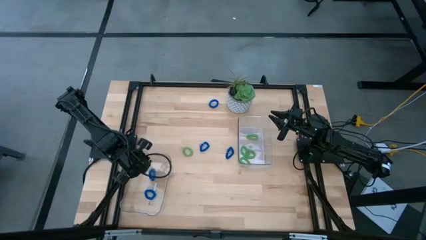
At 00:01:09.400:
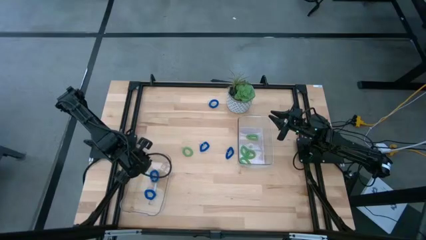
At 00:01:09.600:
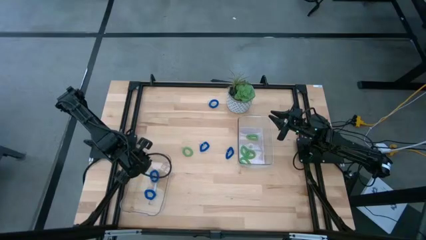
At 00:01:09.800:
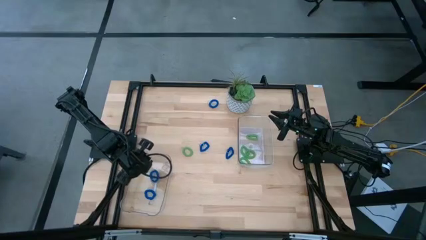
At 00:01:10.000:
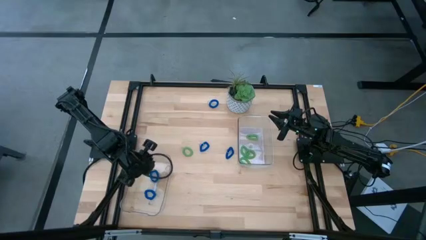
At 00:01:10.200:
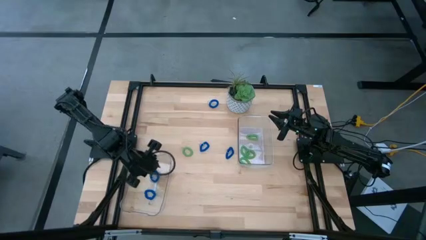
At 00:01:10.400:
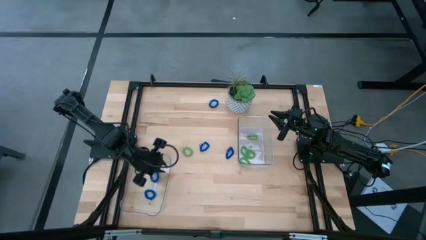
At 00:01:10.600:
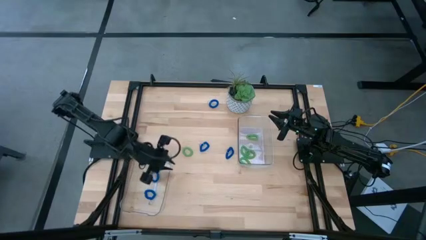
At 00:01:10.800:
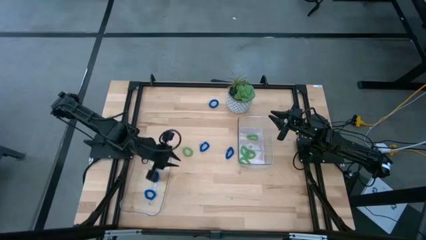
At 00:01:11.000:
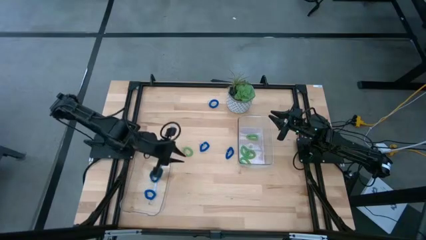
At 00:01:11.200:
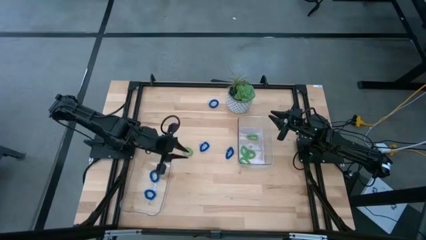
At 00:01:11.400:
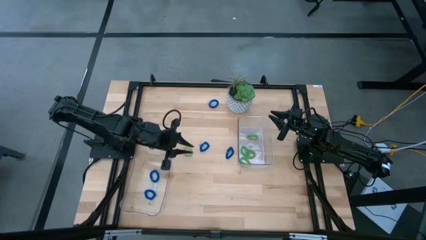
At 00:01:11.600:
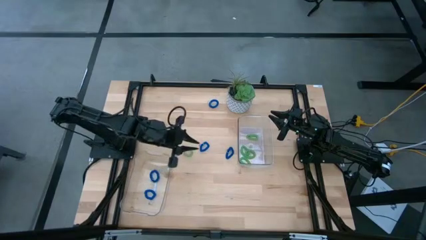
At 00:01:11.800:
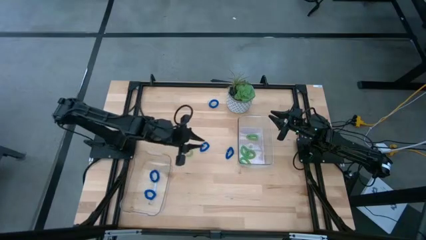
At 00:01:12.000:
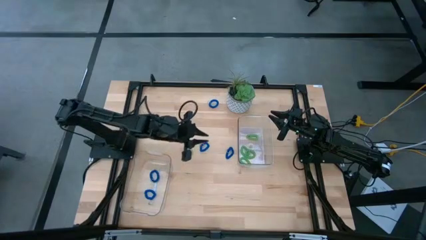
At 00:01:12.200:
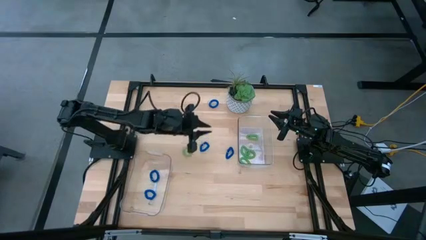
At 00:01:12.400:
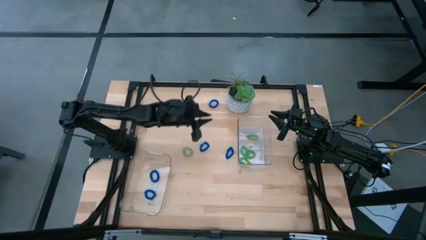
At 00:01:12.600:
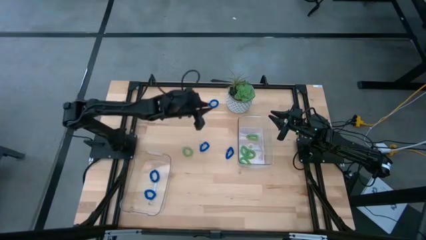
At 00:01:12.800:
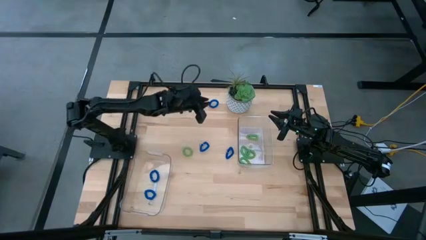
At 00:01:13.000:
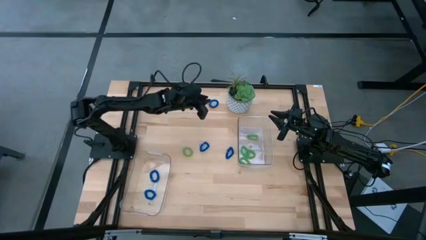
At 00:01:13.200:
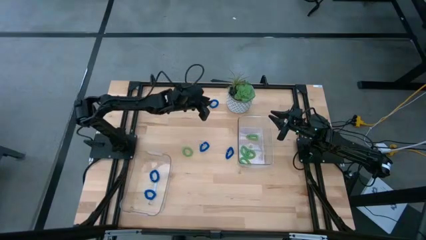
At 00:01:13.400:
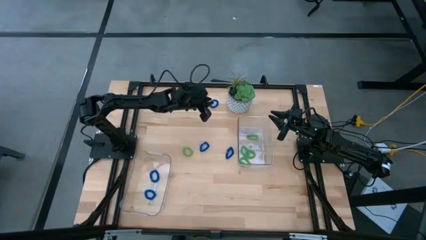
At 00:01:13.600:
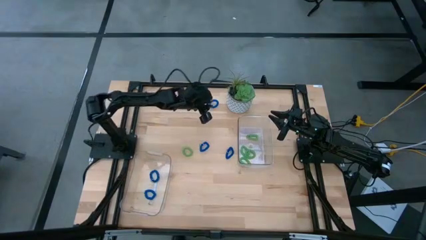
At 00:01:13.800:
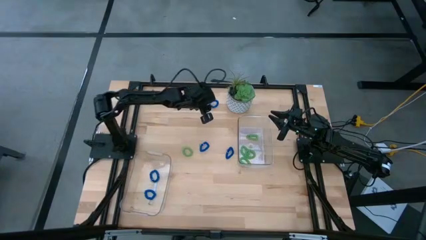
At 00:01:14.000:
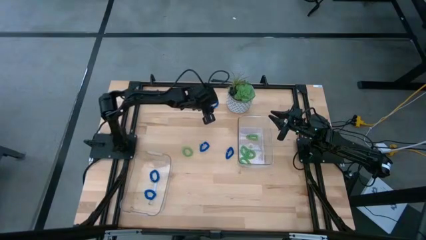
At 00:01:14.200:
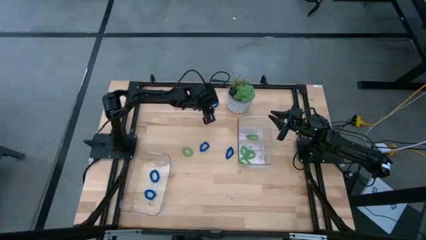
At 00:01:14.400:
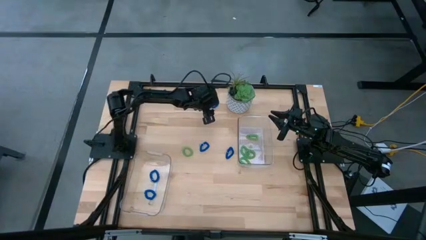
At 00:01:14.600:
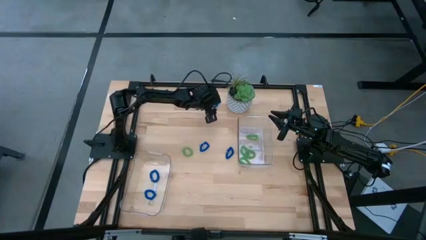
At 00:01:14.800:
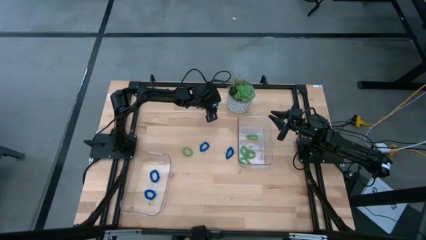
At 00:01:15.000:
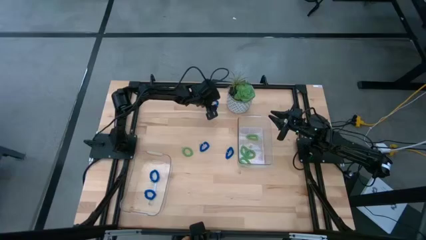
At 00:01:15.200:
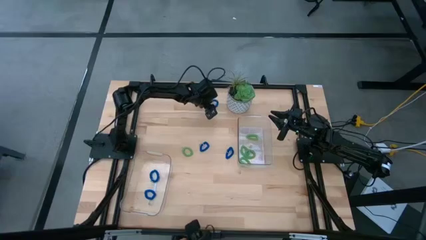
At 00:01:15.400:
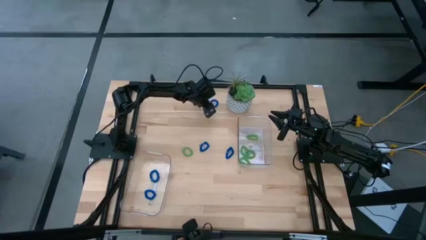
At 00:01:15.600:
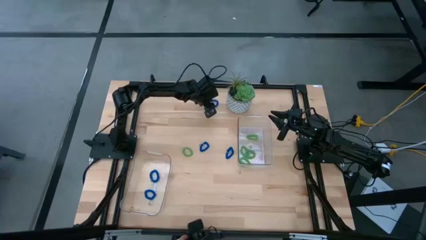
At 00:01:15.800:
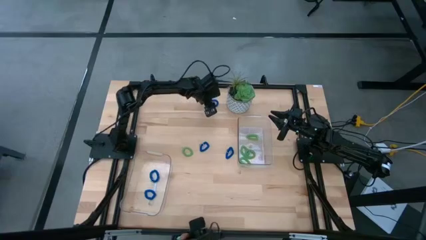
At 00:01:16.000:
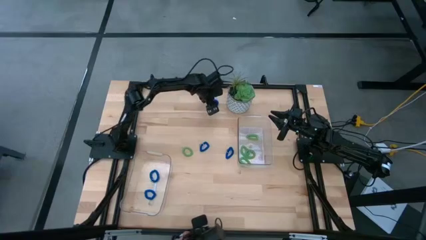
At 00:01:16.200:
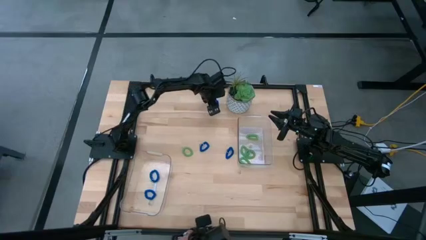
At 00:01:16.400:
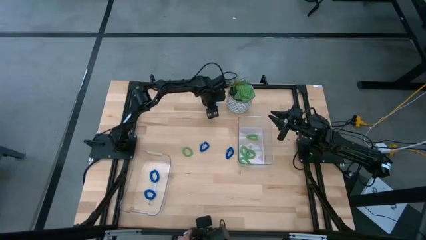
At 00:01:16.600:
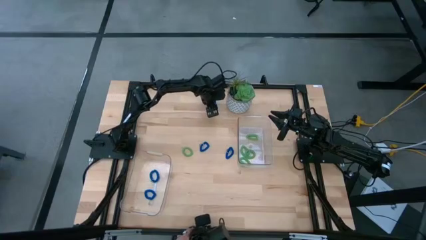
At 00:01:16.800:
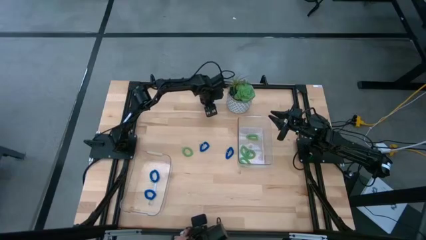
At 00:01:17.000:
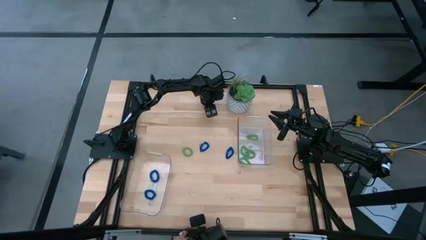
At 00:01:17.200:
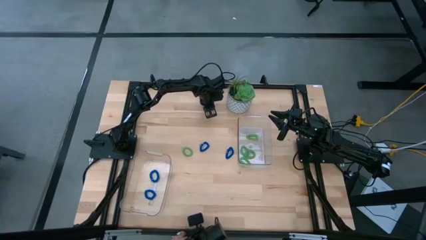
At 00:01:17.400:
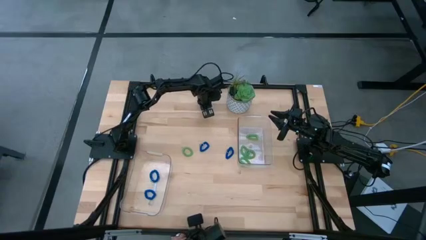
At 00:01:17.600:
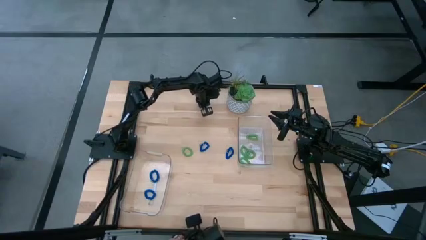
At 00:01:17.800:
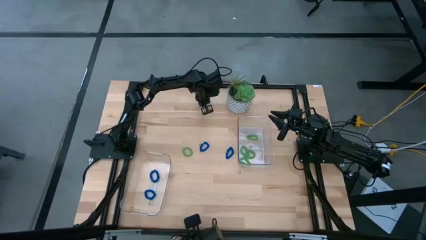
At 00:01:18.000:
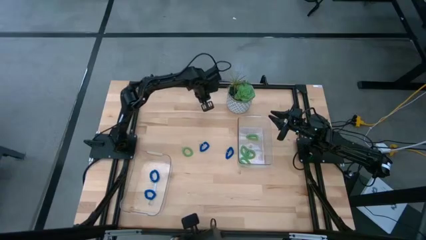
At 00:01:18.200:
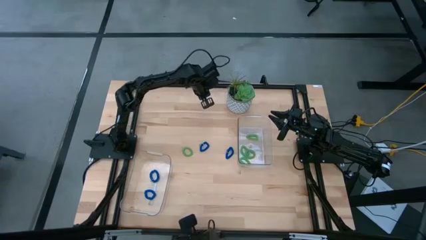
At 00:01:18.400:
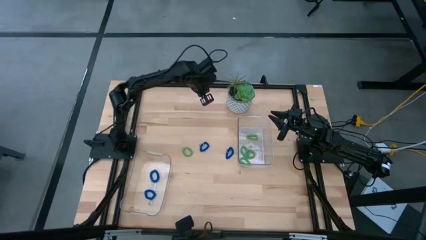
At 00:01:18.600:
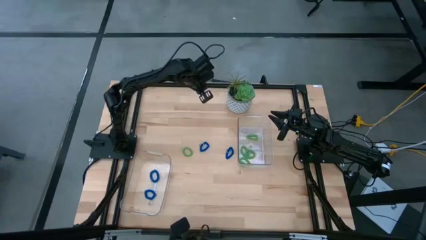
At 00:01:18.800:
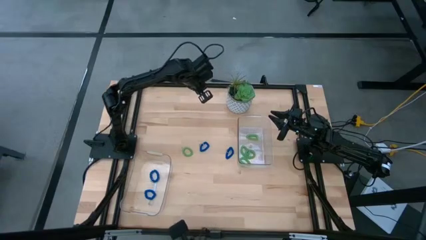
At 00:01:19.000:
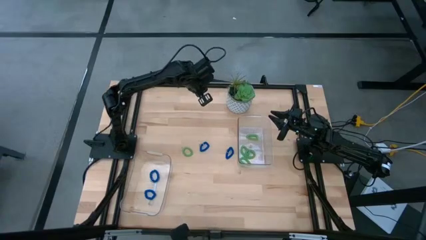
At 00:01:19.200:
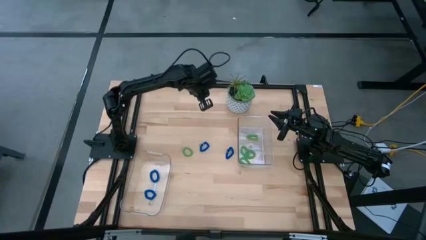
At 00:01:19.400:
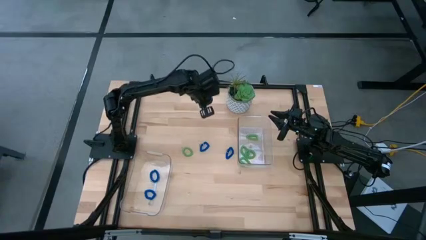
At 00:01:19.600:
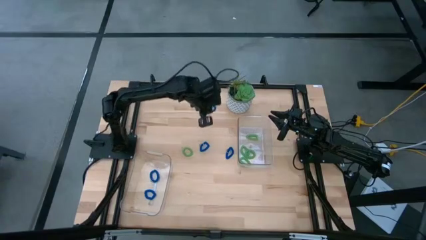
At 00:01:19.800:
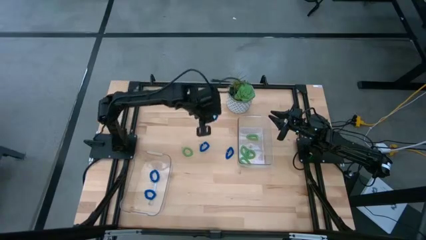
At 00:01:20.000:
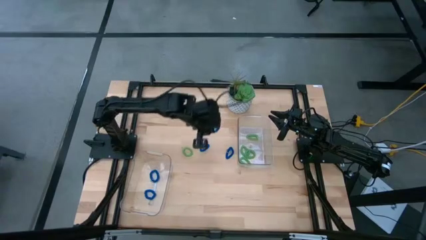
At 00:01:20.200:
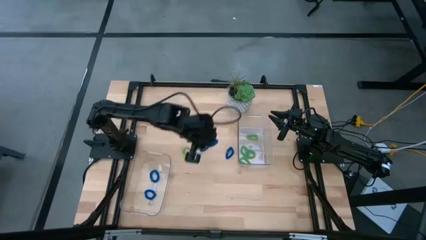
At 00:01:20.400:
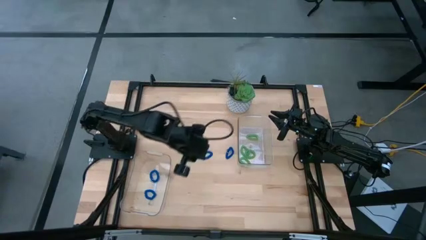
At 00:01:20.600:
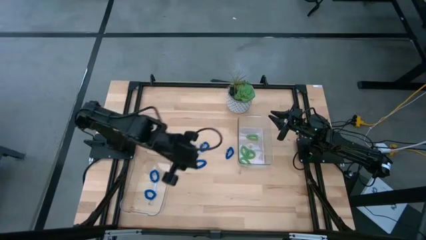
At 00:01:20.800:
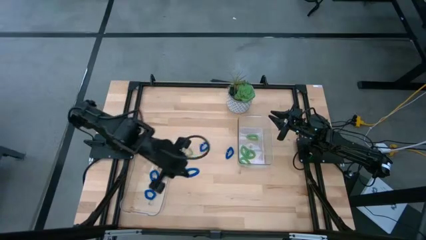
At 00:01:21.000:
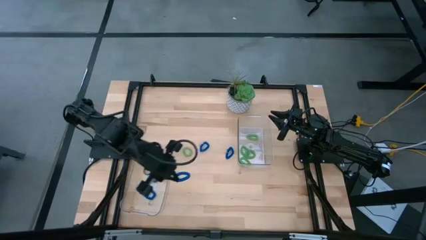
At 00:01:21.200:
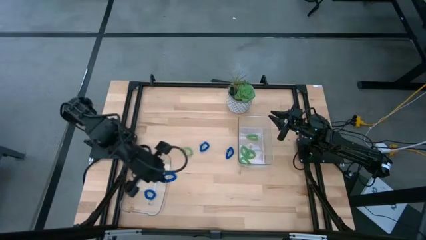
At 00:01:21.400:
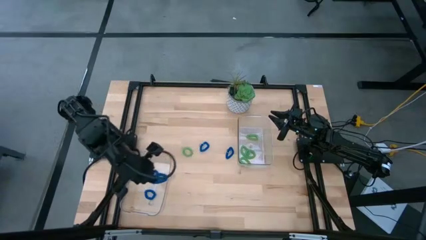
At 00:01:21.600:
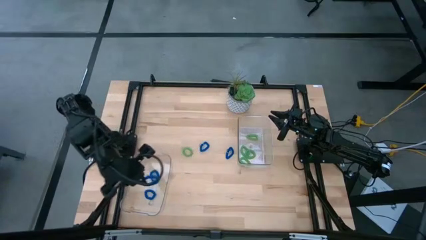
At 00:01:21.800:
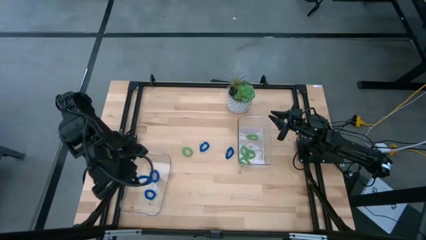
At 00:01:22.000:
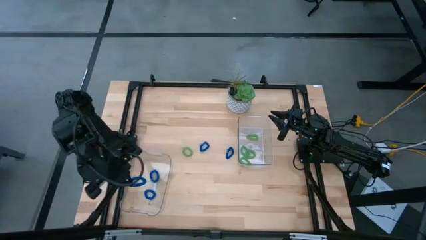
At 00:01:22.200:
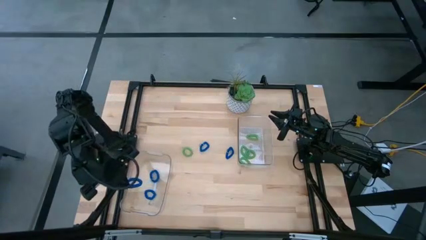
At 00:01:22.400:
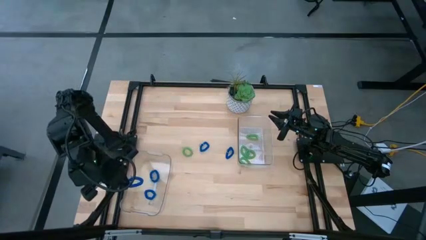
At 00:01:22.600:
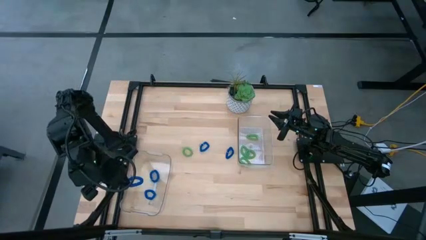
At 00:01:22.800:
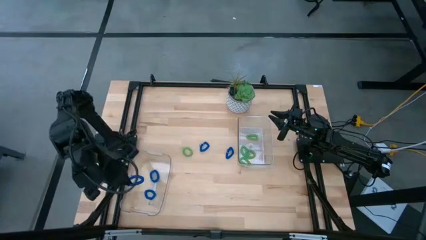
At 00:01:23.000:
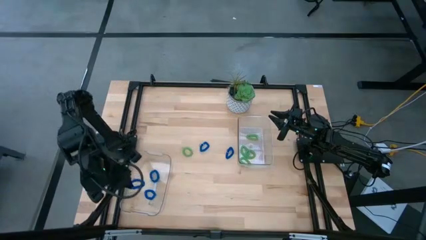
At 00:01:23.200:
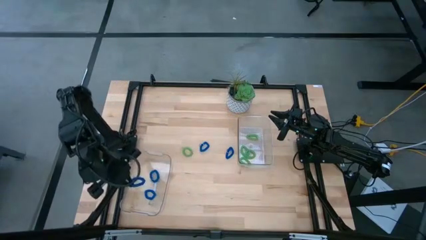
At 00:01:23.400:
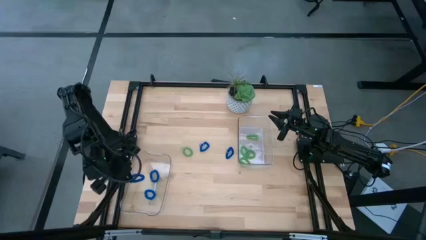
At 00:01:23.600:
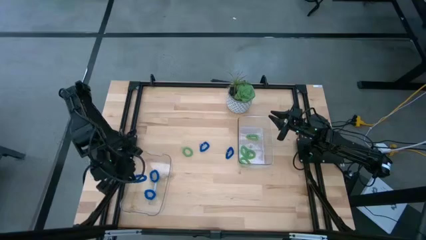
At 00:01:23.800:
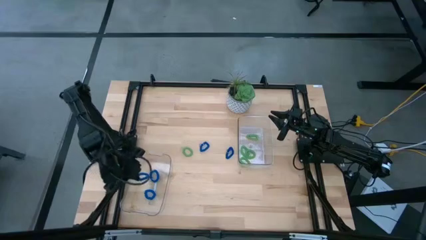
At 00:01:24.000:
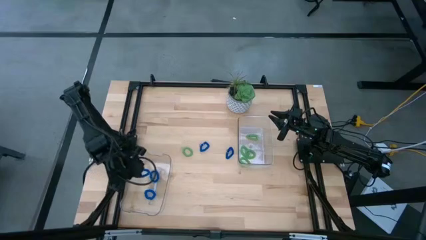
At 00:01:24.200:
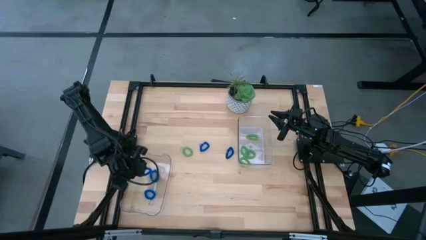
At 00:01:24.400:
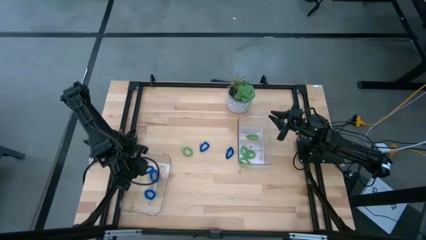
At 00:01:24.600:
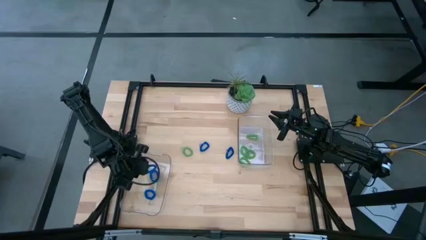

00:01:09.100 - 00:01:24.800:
Task: Sort spring keychains
Put the blue spring keychain into the bottom transparent bin
